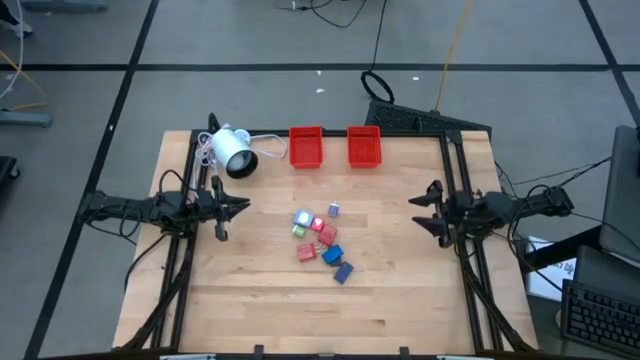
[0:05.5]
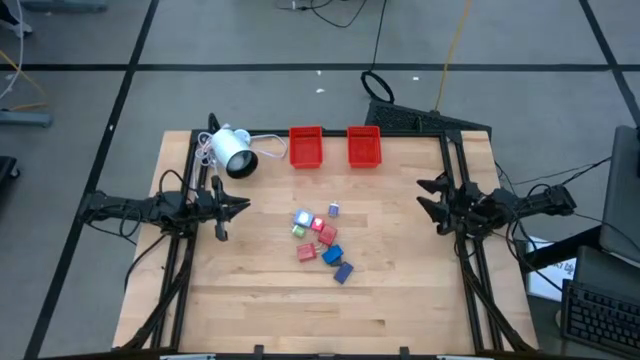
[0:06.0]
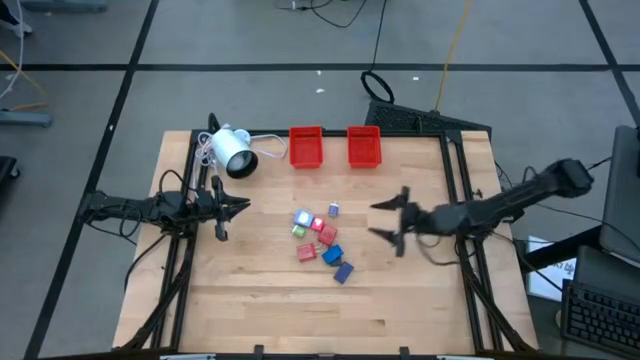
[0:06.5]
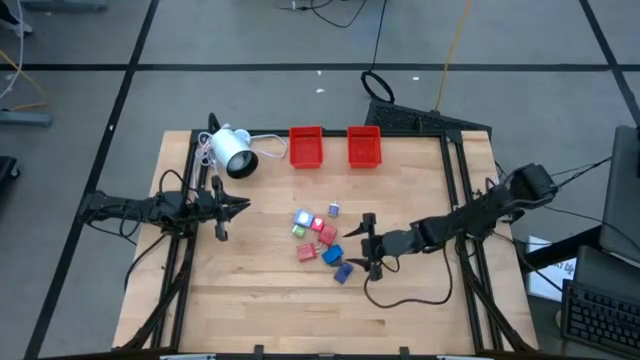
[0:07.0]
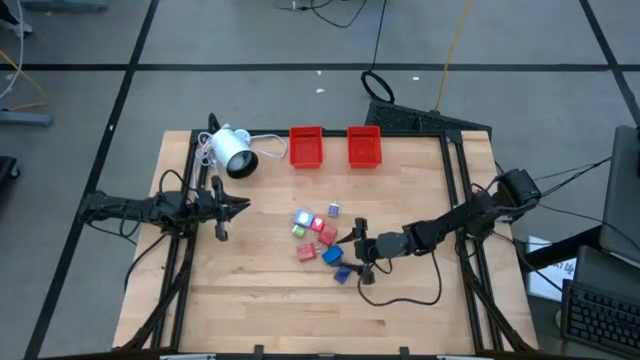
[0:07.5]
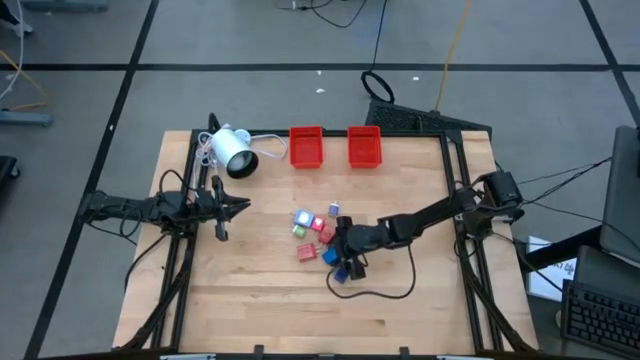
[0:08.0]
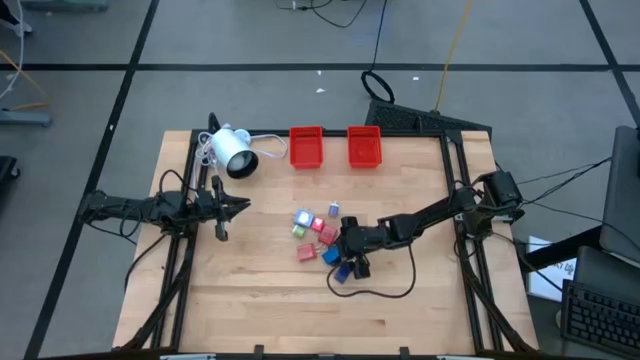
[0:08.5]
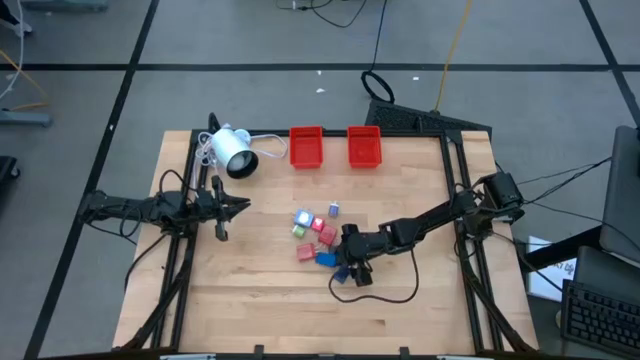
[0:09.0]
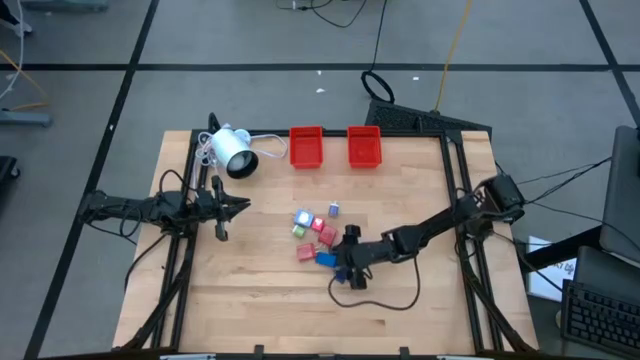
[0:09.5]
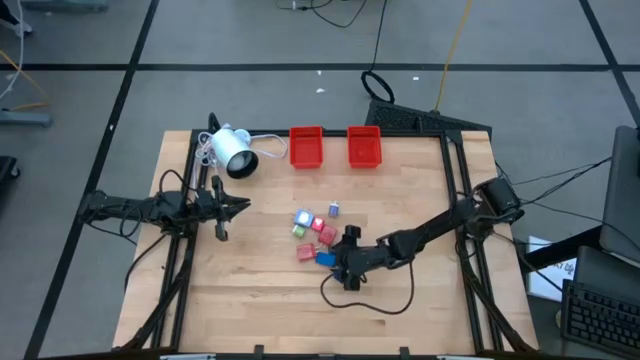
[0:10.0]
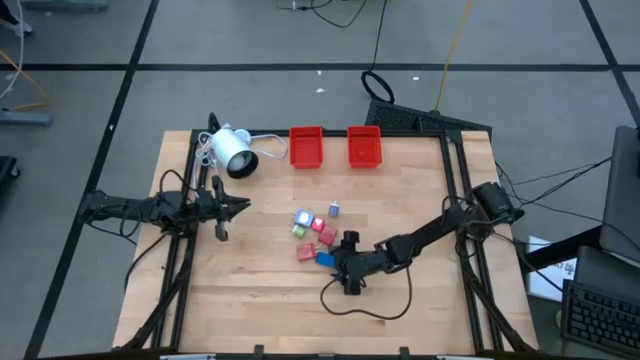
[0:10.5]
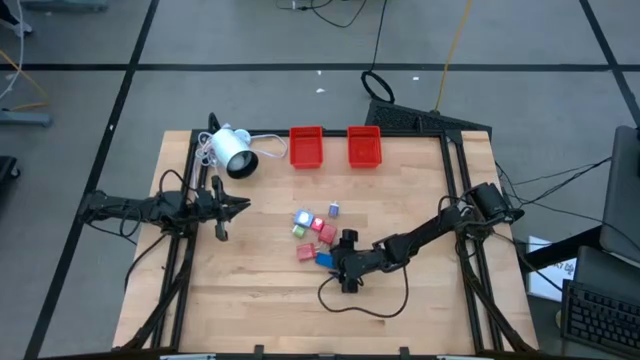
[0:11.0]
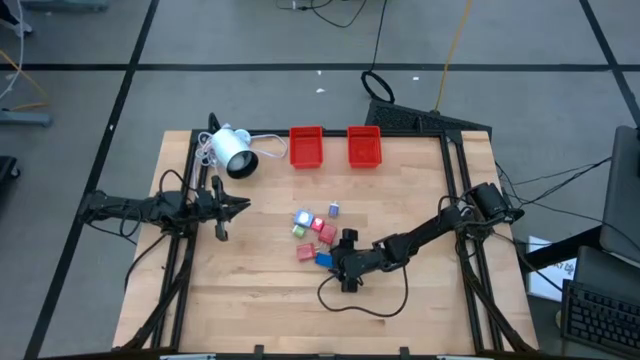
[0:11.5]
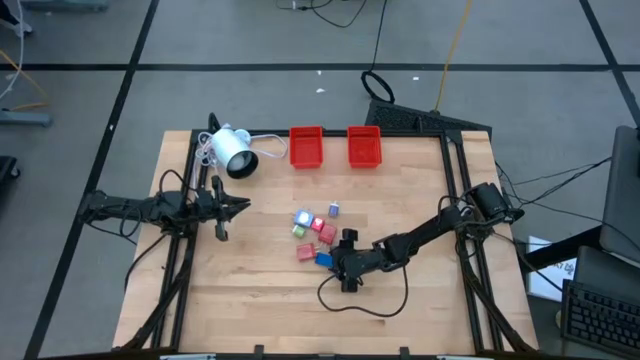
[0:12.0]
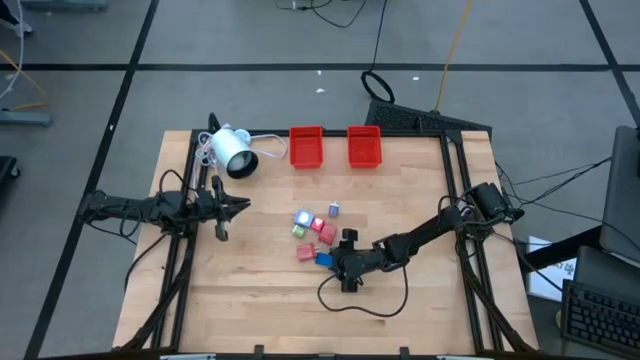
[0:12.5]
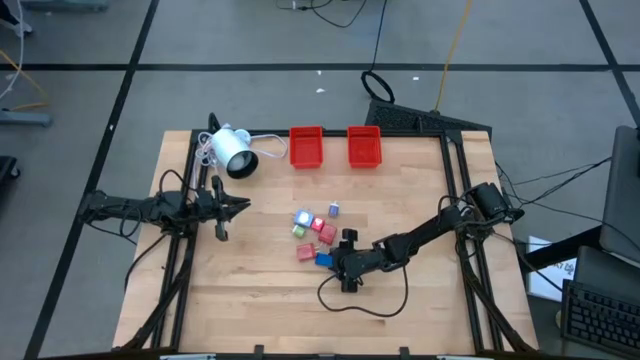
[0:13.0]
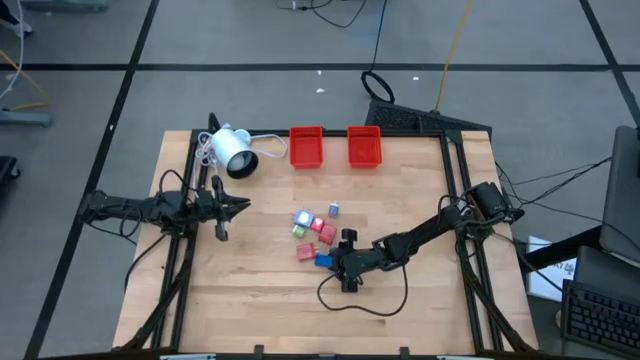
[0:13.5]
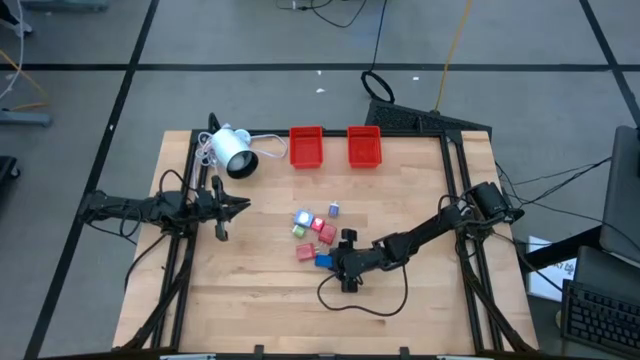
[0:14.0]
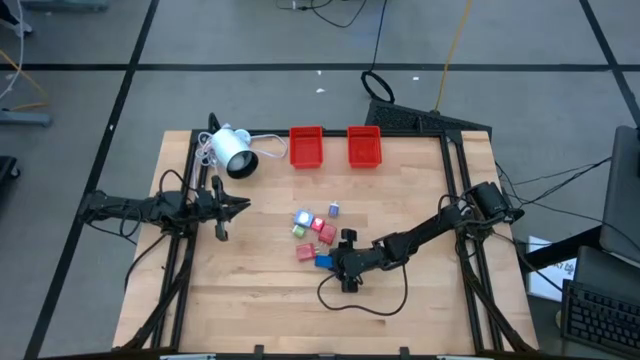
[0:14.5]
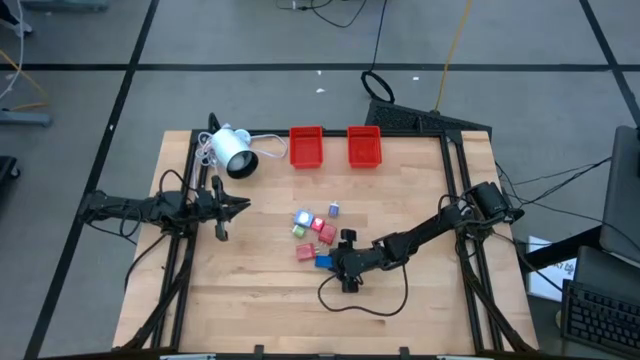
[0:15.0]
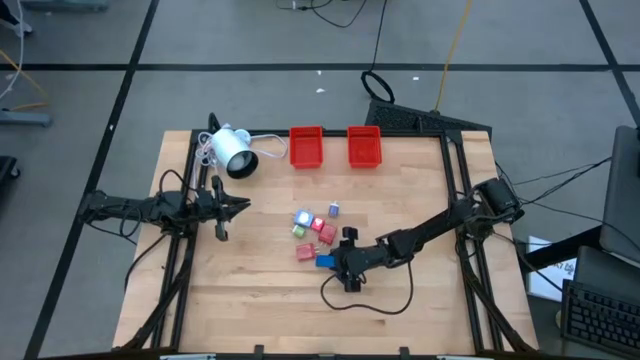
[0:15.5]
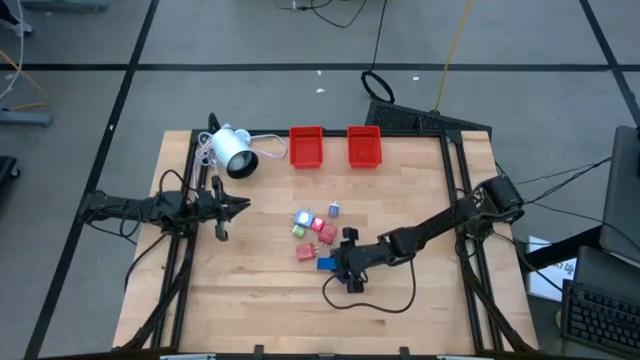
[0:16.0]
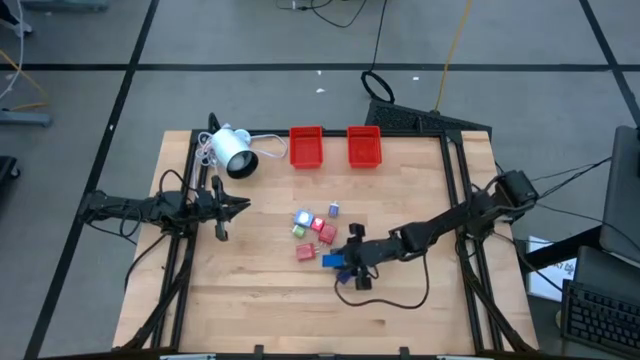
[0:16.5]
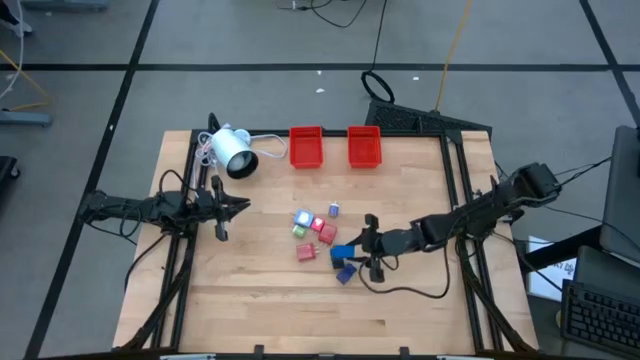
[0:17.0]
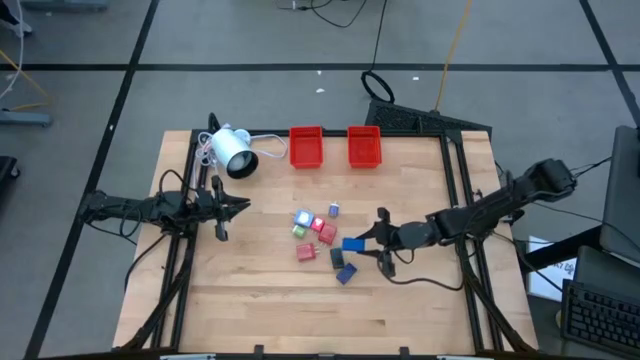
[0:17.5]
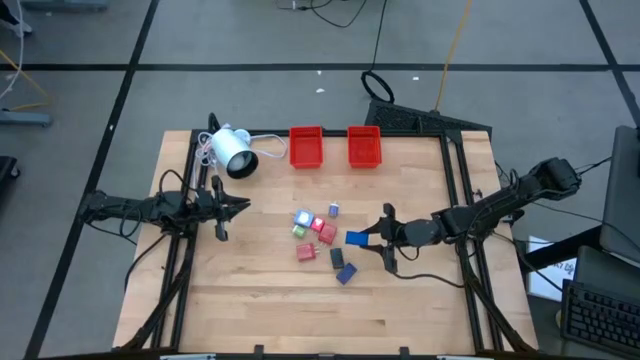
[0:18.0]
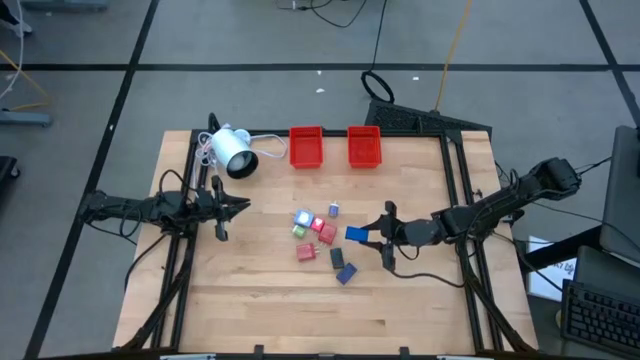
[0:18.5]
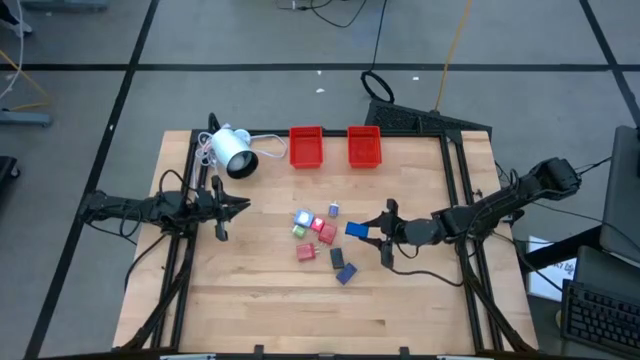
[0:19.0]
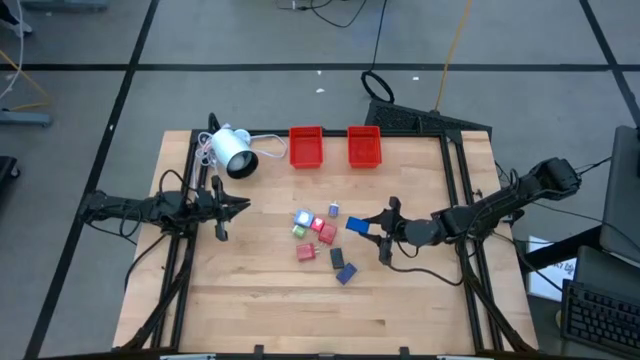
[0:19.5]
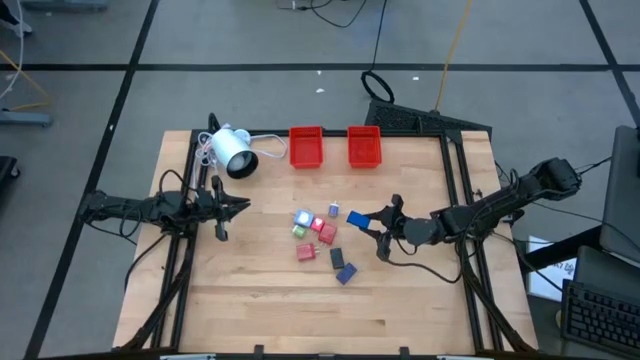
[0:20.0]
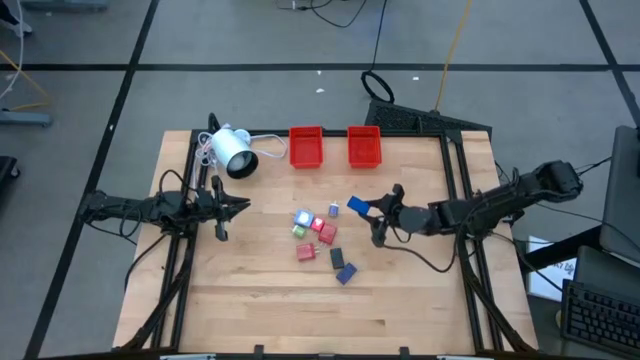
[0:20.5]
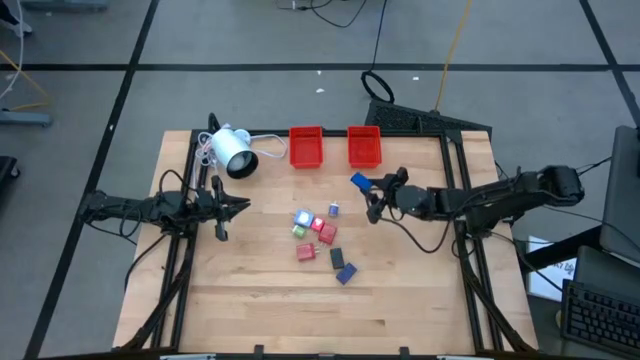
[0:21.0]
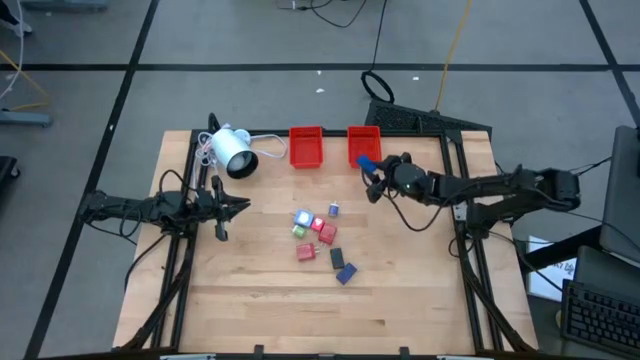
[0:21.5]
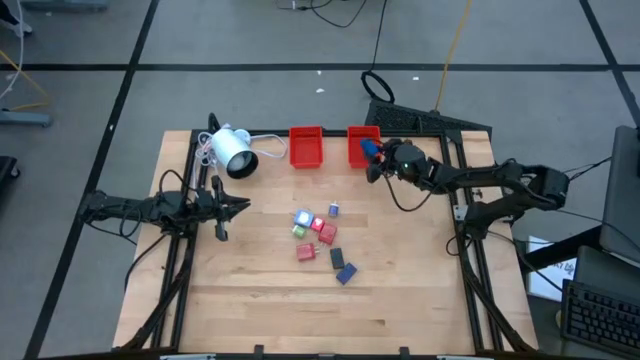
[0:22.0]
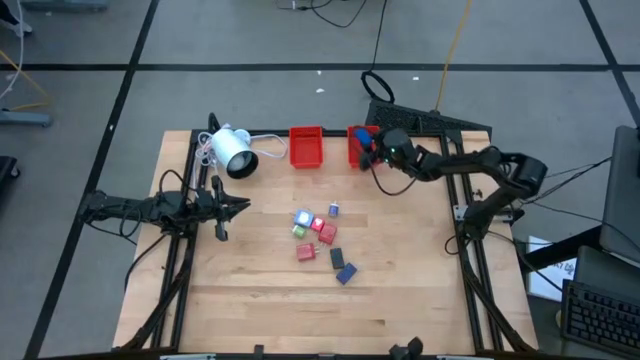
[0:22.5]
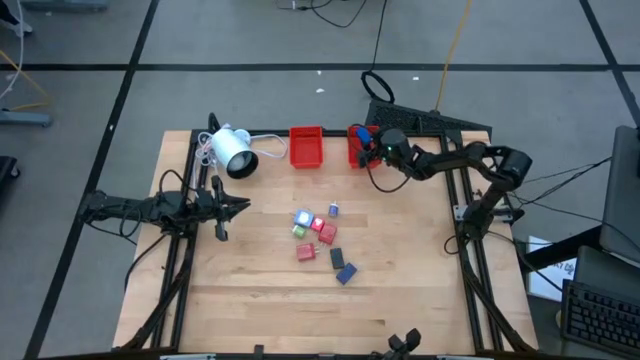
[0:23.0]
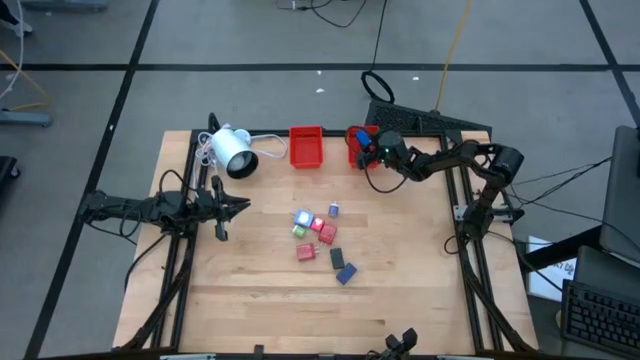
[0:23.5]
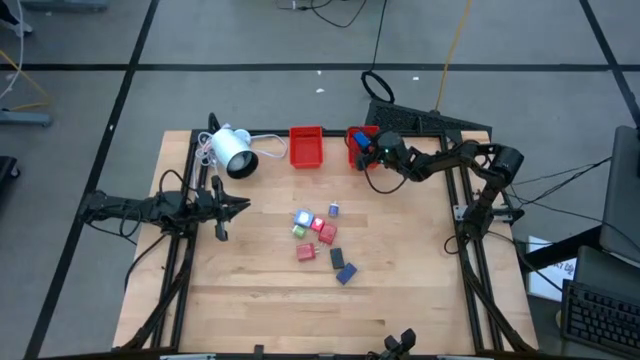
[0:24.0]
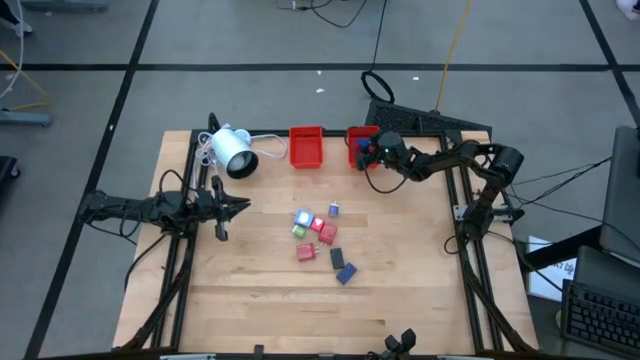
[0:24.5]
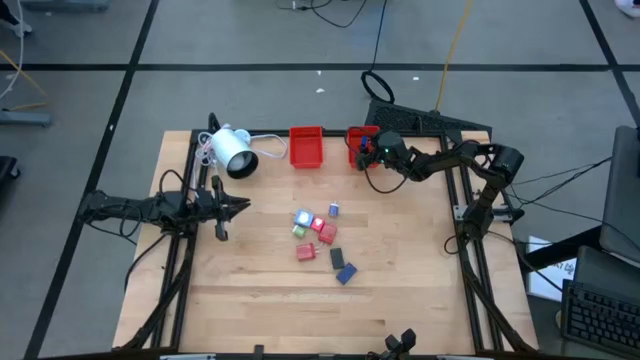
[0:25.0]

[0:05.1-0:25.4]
Task: Pick & Place Office items
Put the top blue digital clock into the right red bin
